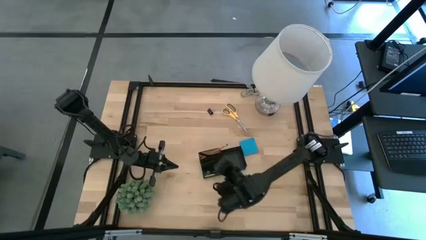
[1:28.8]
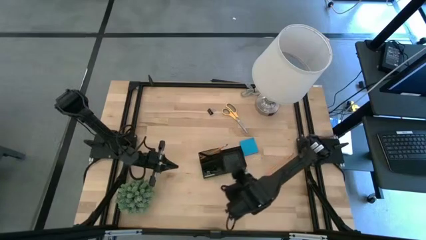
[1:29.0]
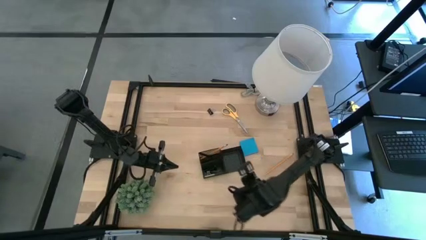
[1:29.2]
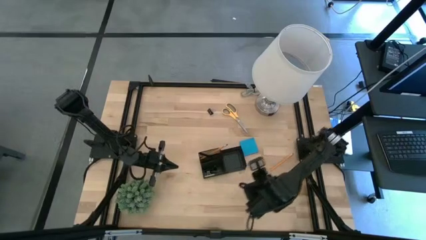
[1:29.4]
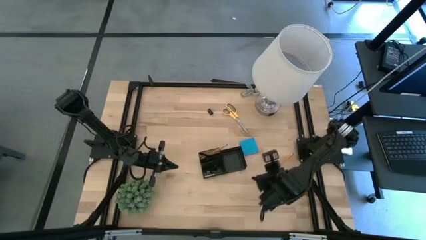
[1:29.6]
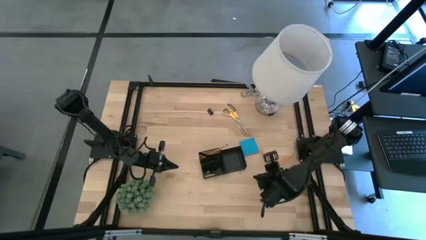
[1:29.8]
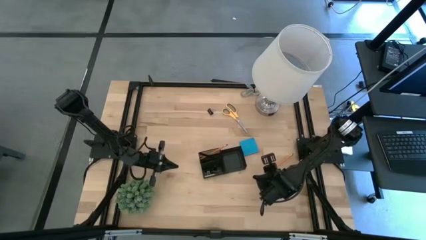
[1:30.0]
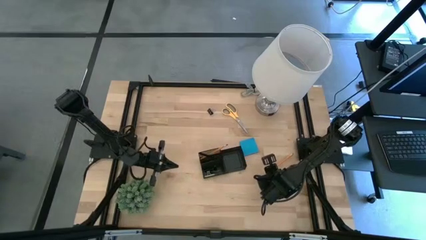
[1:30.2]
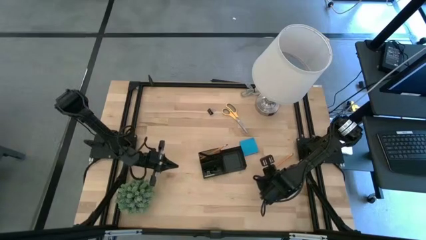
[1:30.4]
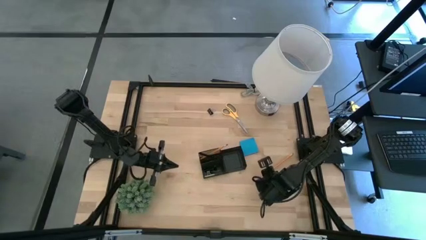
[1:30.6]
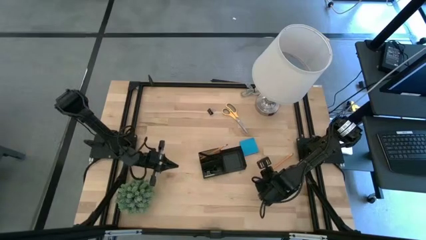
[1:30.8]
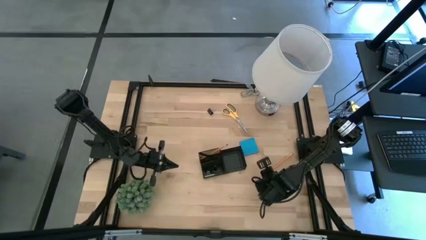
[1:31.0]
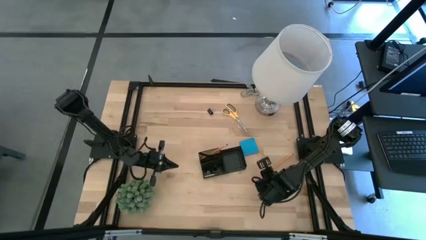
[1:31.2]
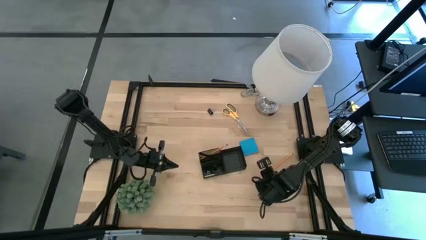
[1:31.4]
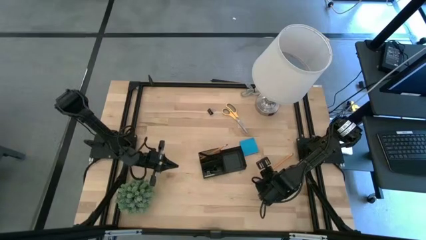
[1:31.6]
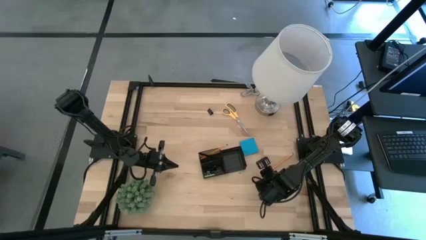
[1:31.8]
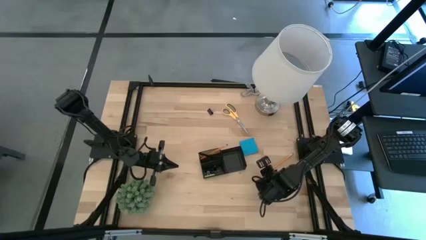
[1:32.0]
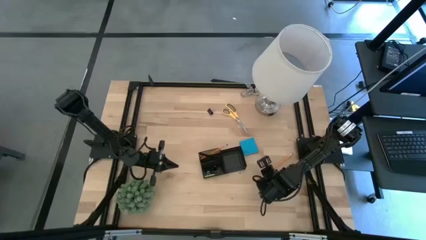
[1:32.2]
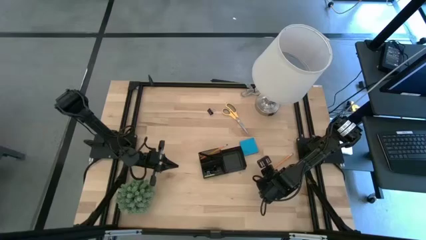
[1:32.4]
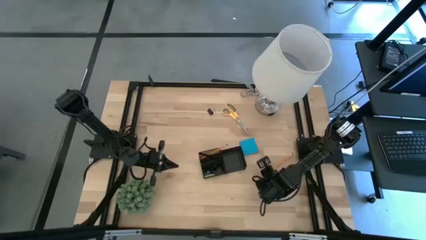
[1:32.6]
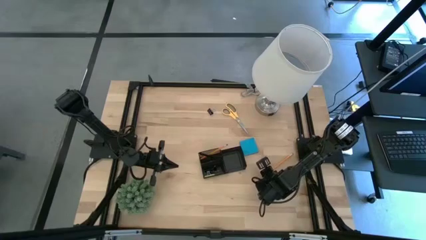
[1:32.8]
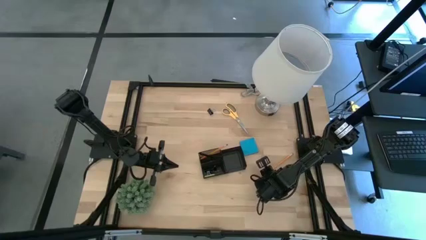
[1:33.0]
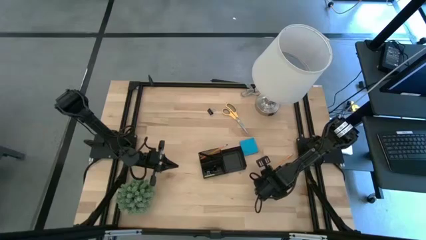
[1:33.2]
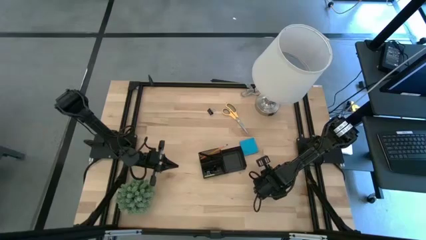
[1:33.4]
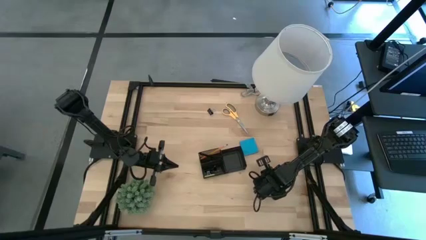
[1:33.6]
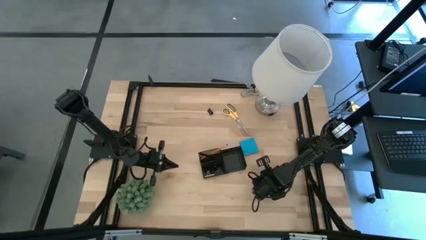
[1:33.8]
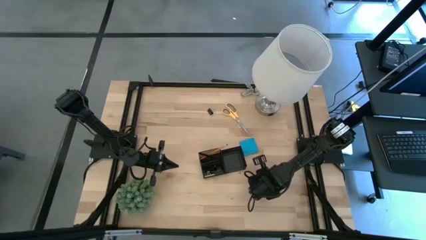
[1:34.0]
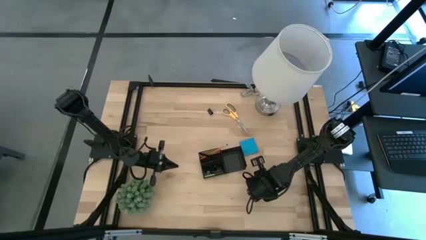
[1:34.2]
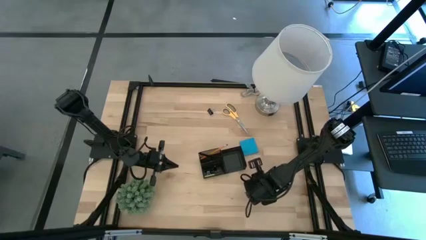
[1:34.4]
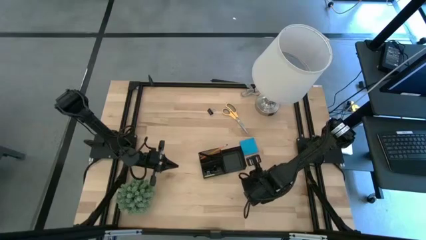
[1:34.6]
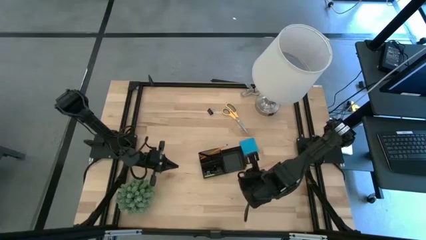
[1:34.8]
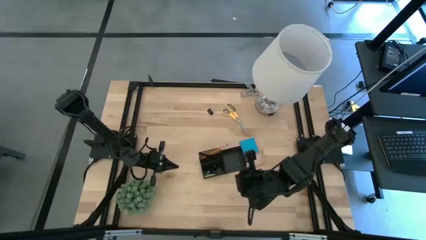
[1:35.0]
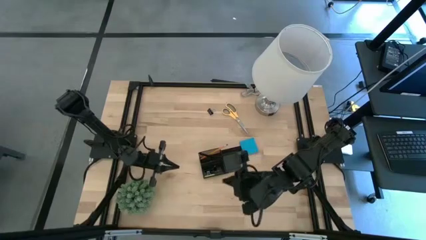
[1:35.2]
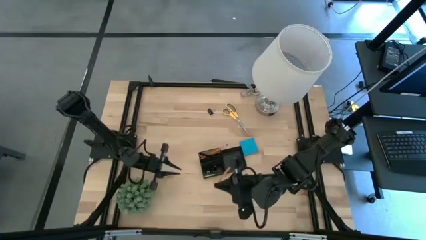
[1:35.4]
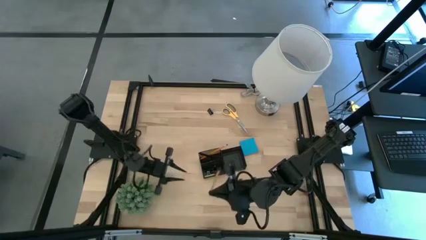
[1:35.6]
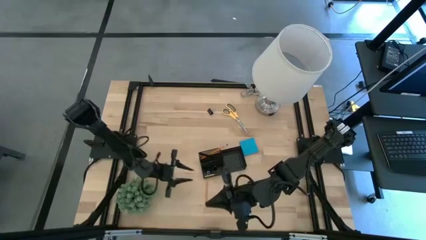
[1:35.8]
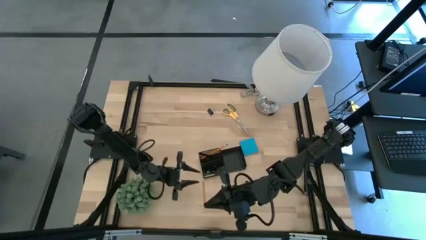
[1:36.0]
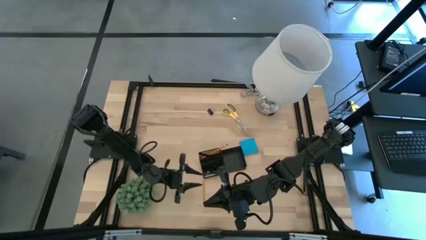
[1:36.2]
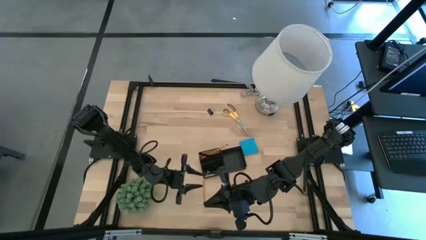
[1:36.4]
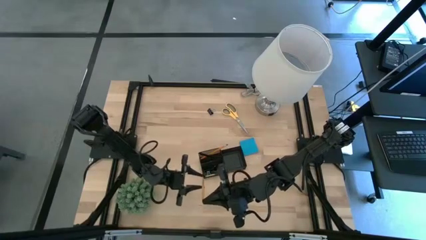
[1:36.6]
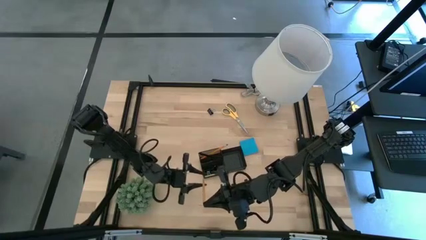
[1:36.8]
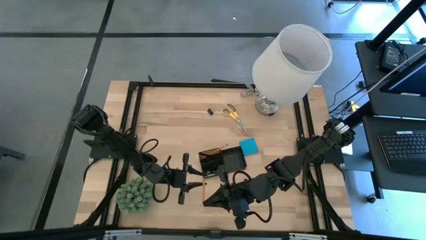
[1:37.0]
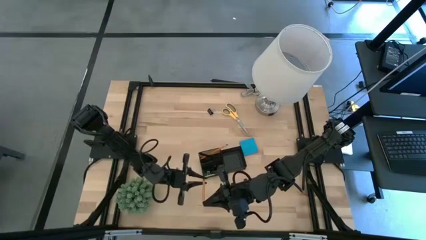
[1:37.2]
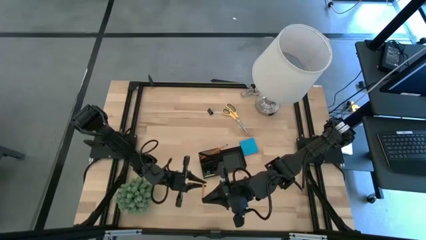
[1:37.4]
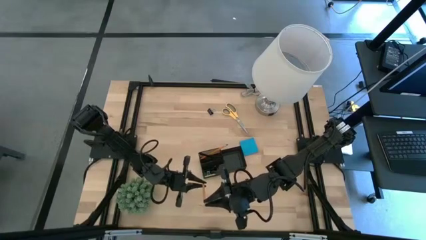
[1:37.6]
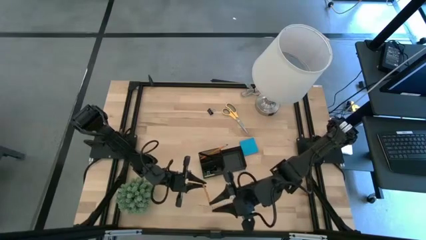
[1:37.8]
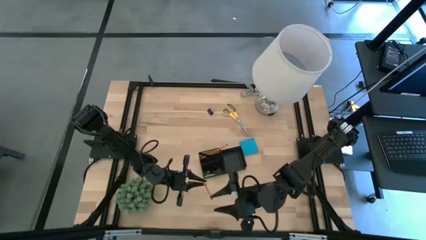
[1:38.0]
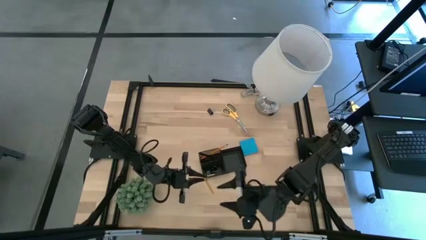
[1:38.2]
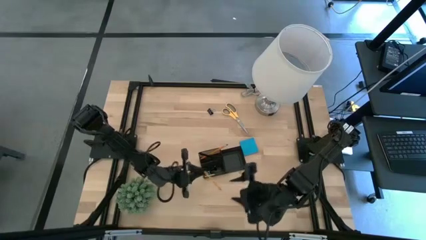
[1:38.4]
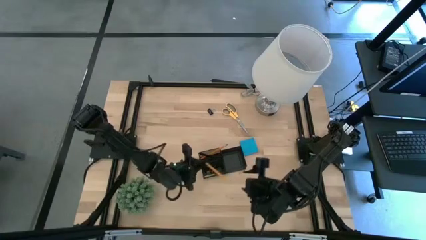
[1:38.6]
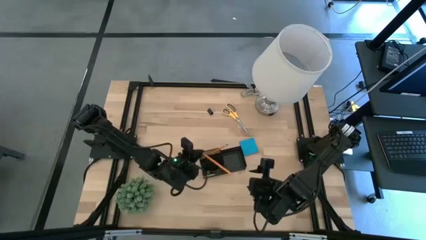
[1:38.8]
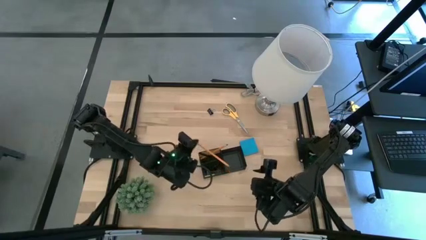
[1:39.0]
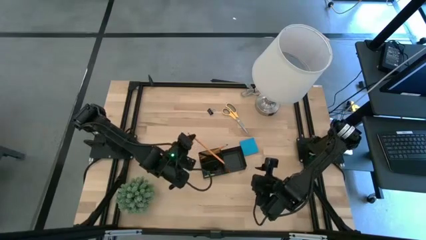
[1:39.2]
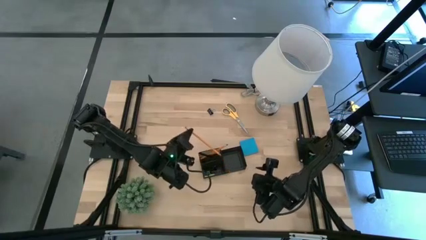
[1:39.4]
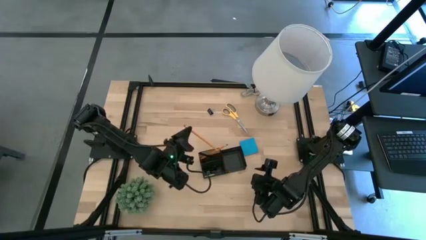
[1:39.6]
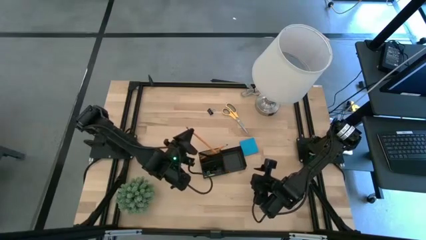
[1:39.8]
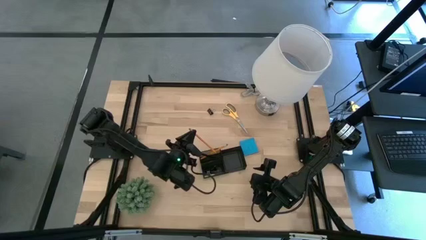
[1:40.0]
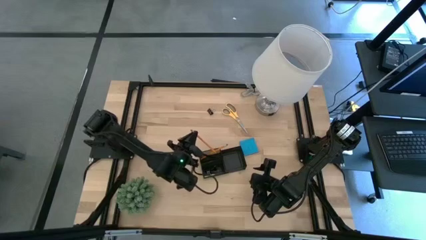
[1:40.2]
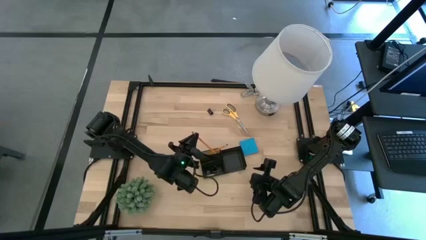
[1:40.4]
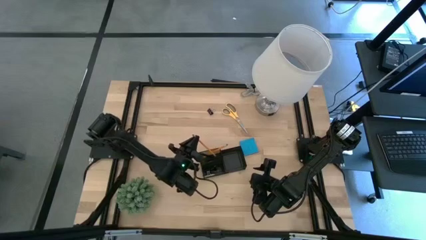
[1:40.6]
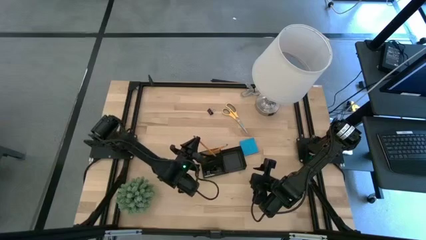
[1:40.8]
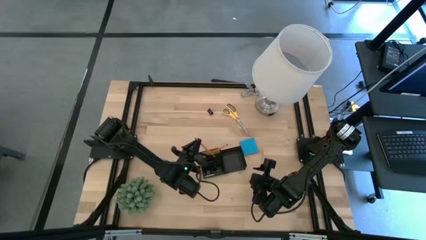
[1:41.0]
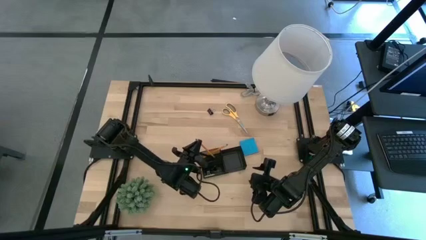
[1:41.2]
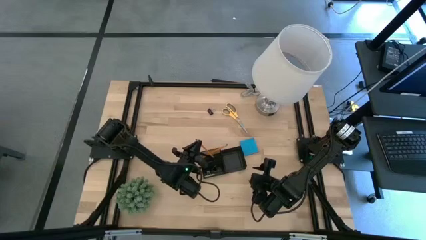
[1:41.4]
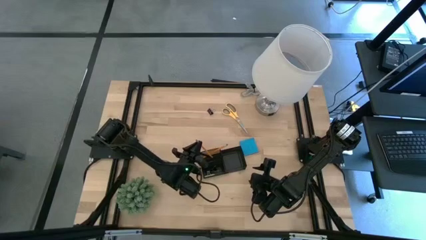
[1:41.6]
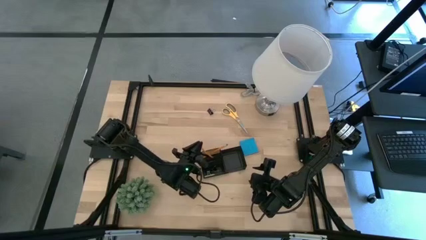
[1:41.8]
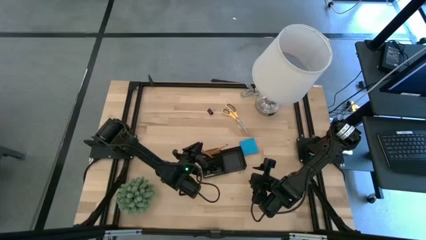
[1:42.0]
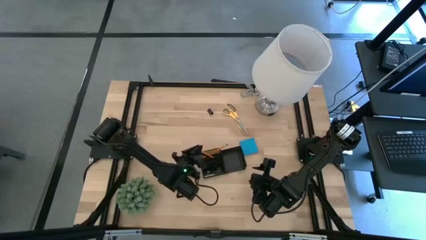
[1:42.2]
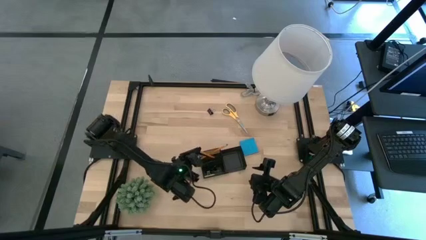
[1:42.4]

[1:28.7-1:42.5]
Task: Pick and place office supplies into organizer
Put the orange pencil into the desk organizer

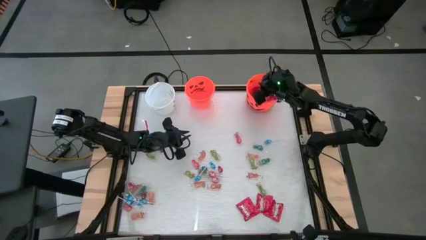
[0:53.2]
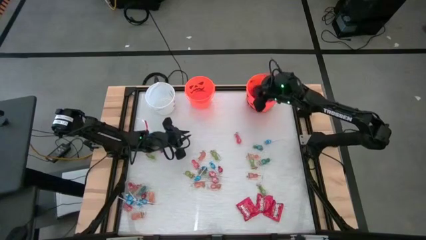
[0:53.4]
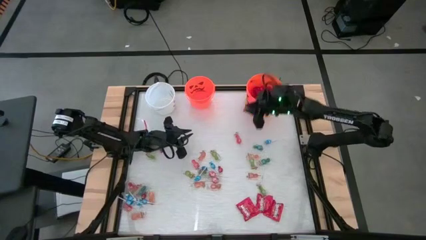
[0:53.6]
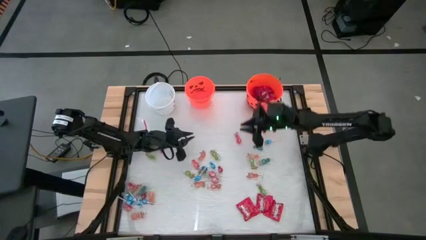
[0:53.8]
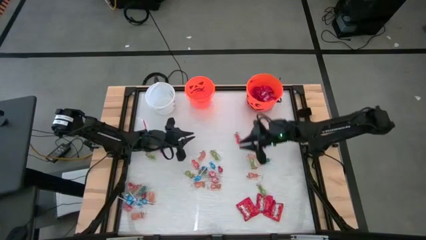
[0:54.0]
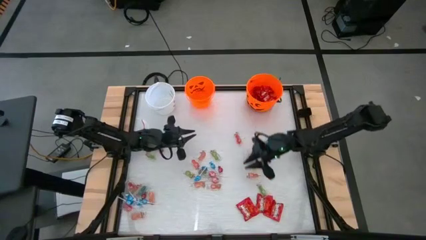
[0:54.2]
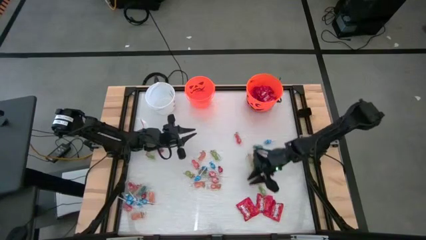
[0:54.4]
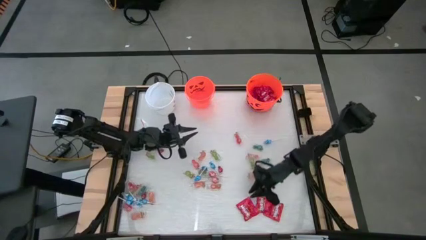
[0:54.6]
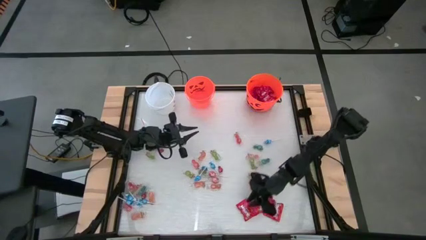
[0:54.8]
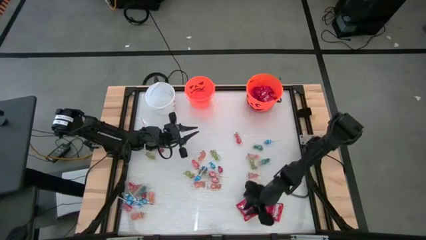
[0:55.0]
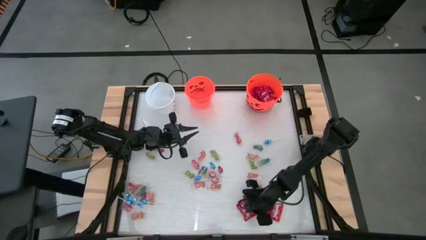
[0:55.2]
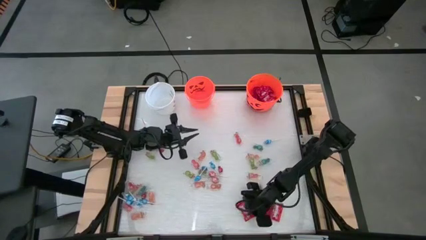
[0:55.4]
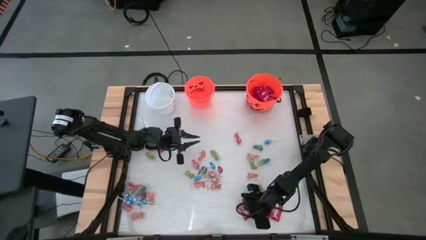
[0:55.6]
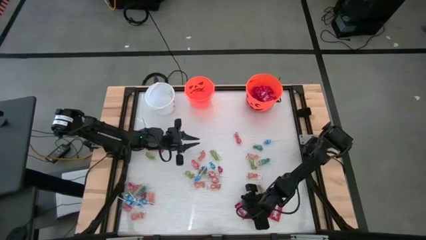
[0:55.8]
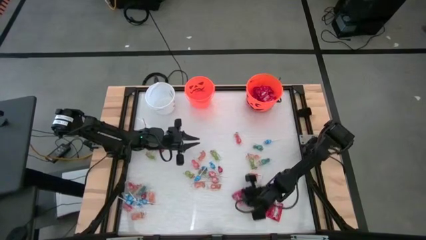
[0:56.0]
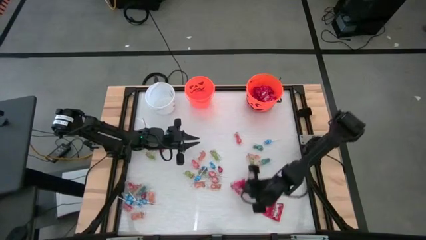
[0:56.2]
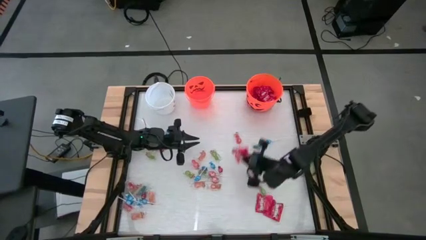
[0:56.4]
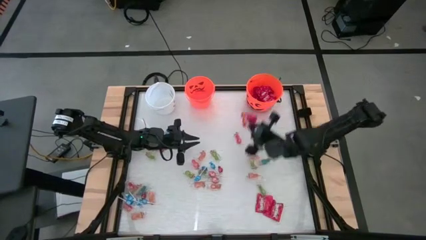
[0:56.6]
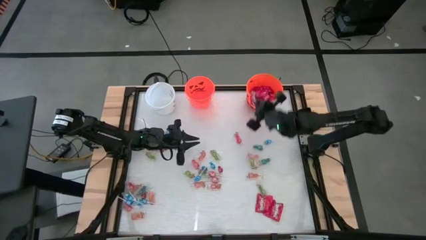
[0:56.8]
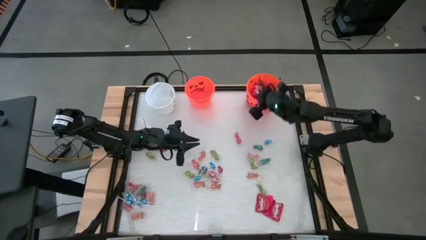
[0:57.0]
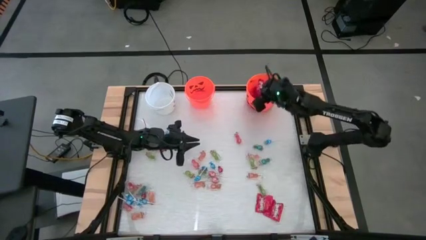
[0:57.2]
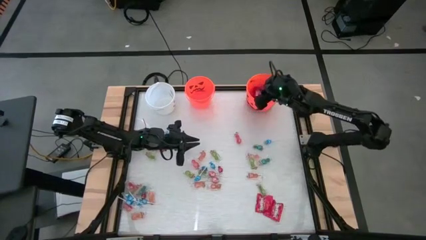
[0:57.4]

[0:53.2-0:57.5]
Task: Sort candy by brand, put in halloween buckets
Put the left red candy into the right orange bucket
